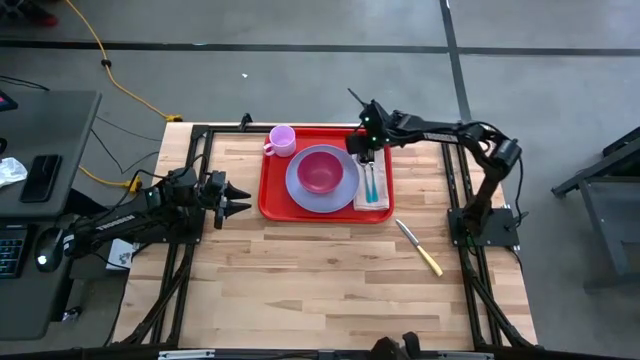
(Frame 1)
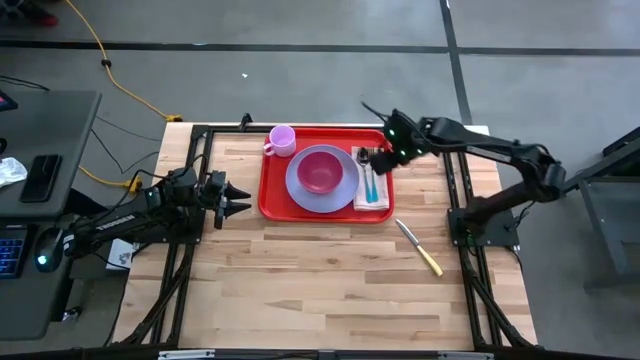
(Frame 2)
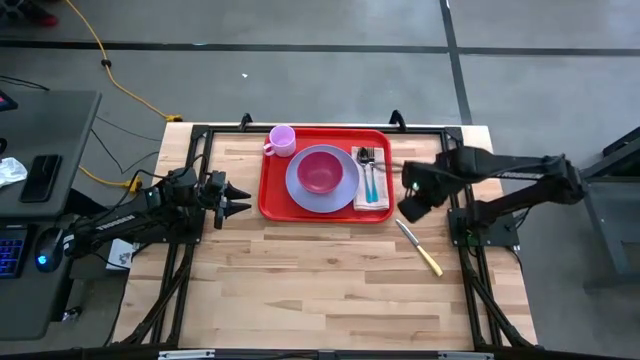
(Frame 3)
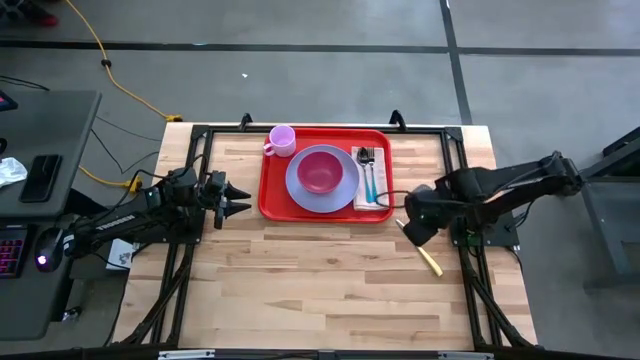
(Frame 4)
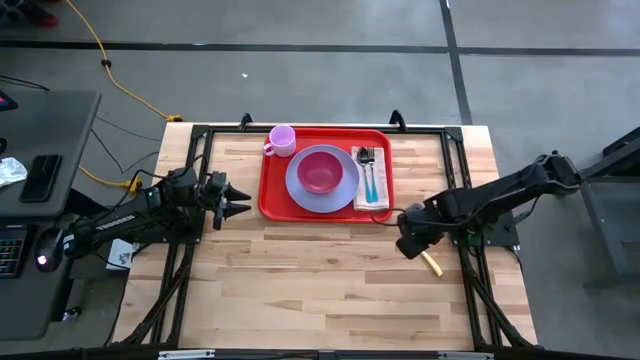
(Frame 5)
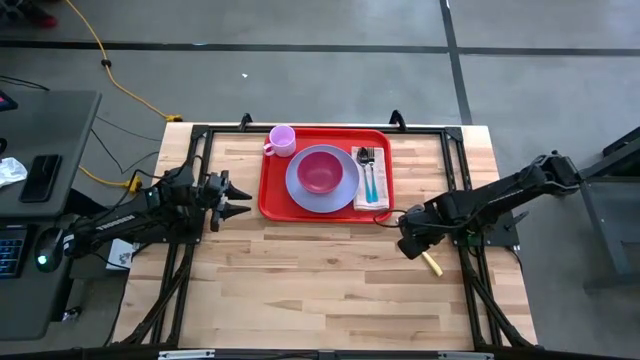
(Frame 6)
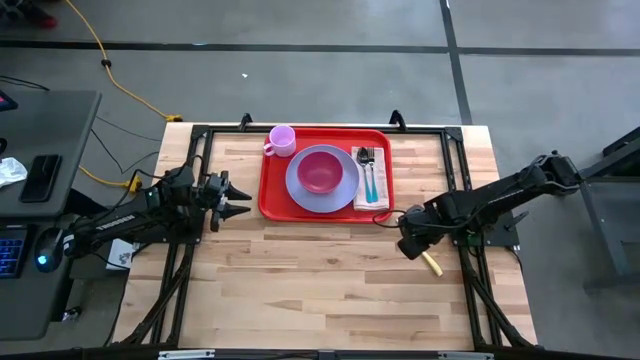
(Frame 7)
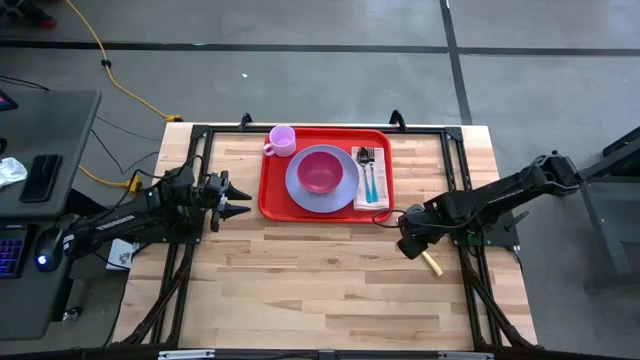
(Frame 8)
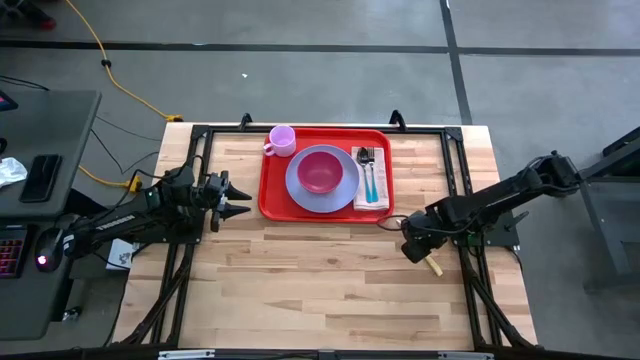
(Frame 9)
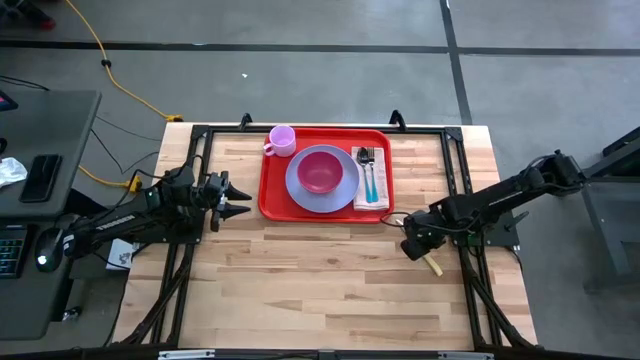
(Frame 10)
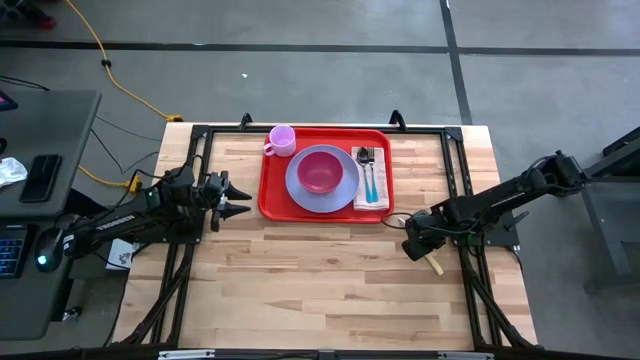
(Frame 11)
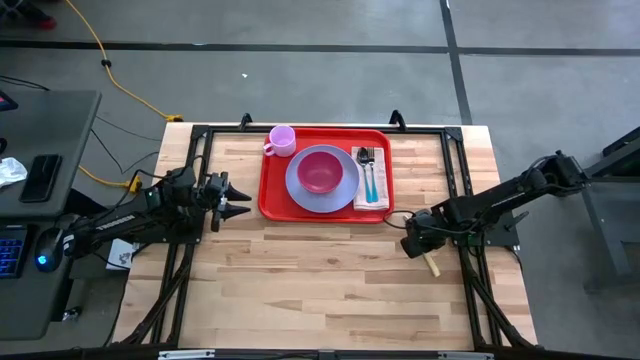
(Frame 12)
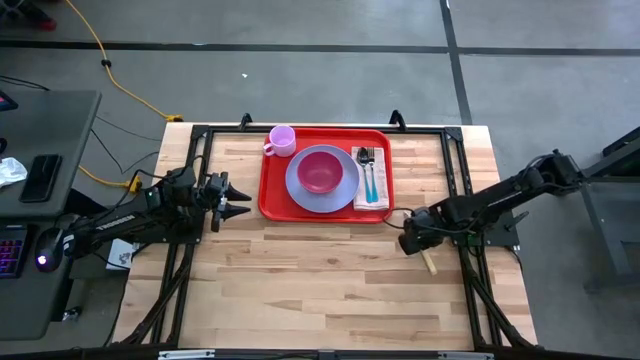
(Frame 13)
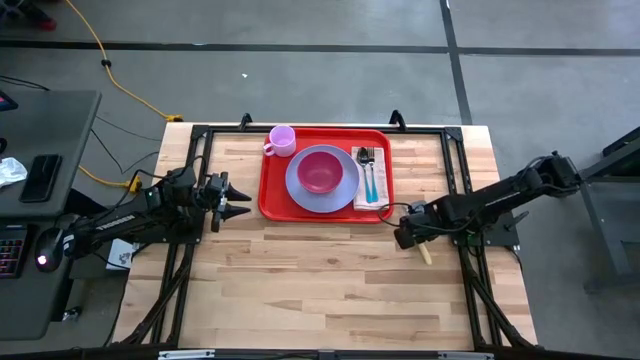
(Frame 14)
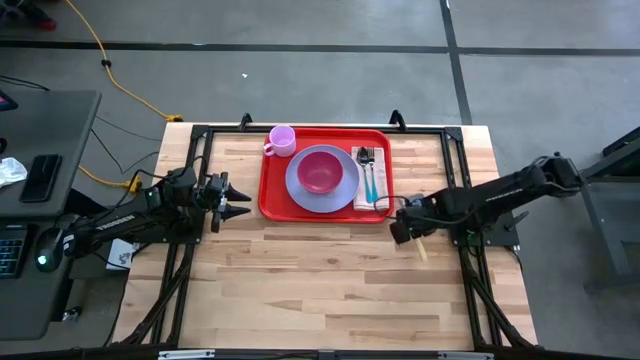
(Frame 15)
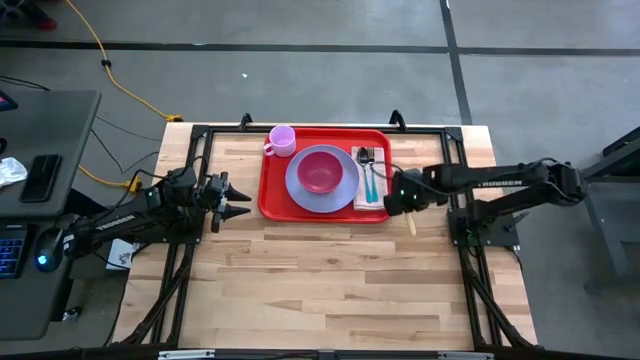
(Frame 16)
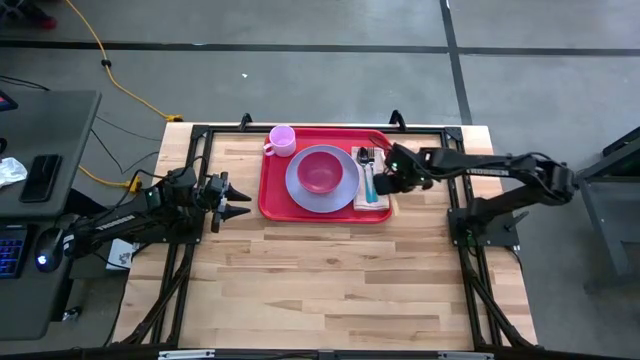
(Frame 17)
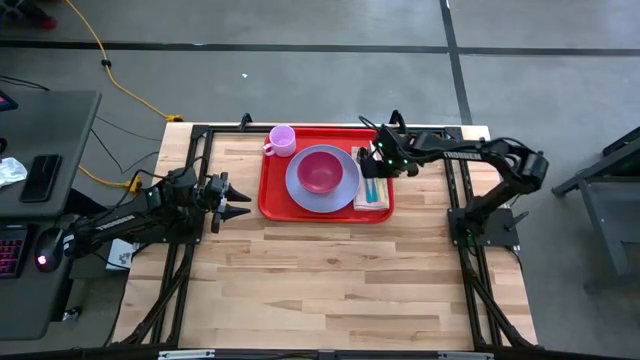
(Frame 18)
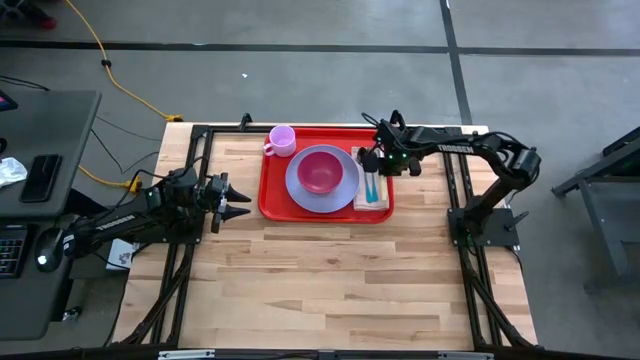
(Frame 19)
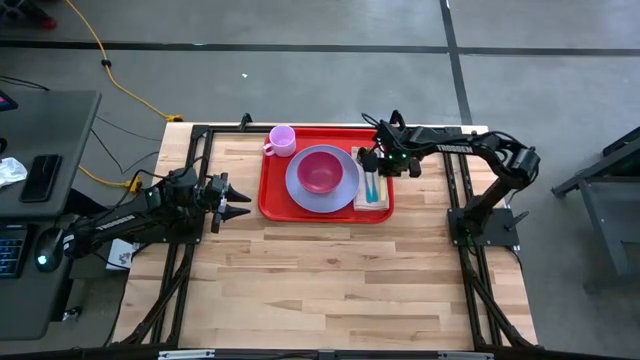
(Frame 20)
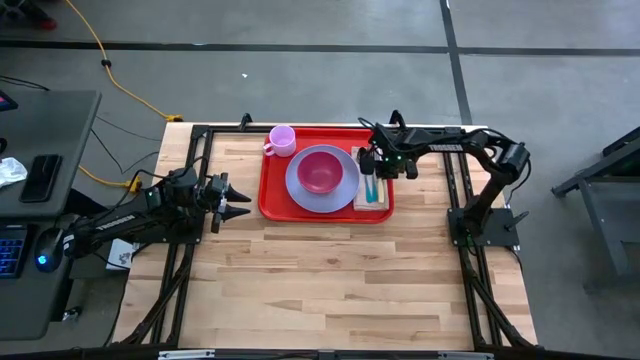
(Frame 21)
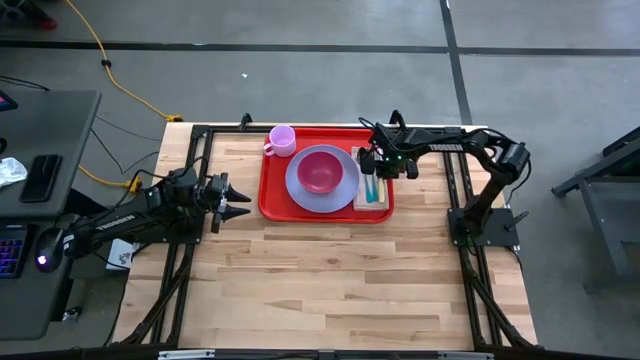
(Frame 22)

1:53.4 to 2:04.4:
Task: Set up tray
Put the knife on the napkin on the tray

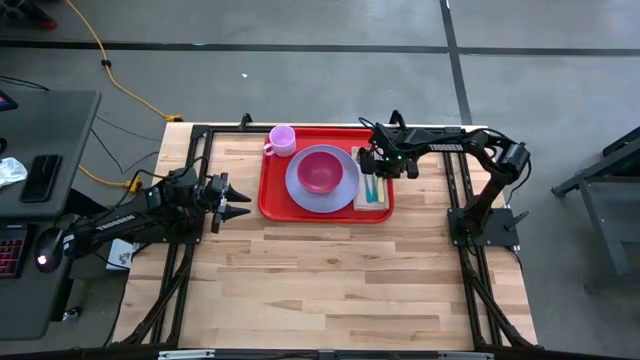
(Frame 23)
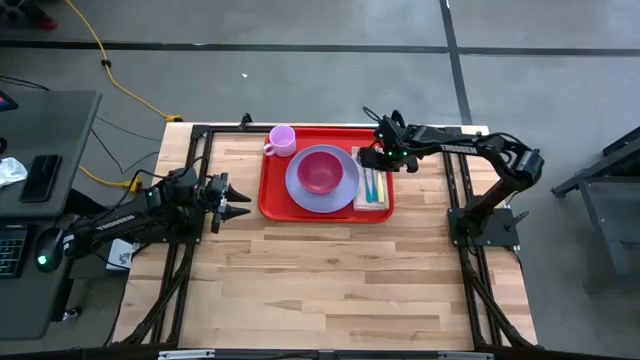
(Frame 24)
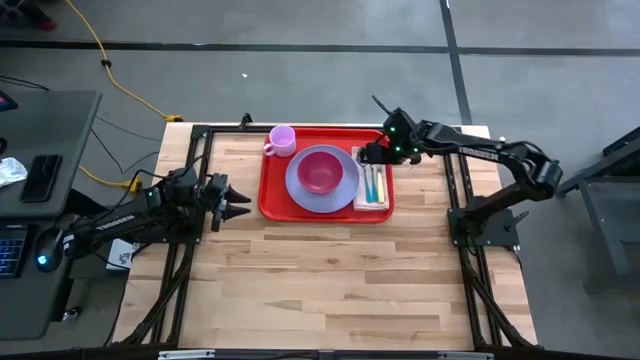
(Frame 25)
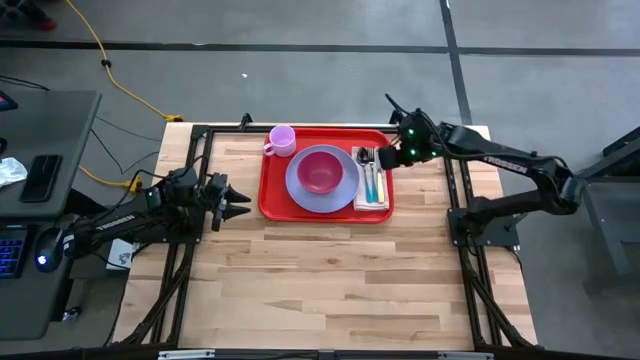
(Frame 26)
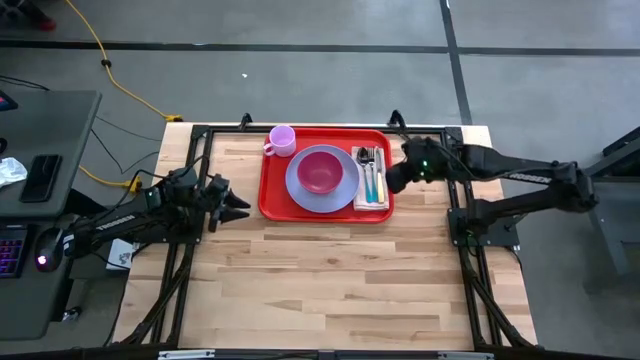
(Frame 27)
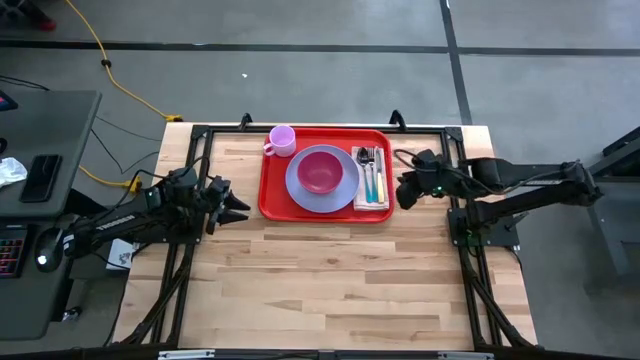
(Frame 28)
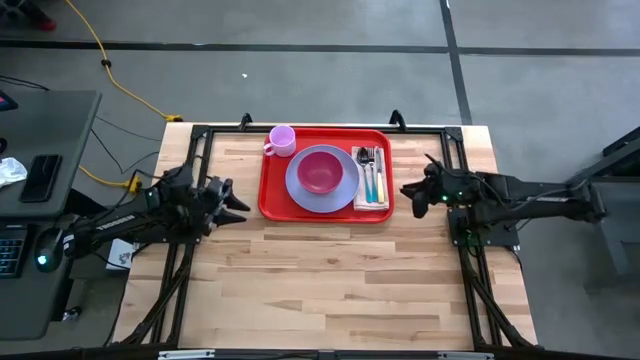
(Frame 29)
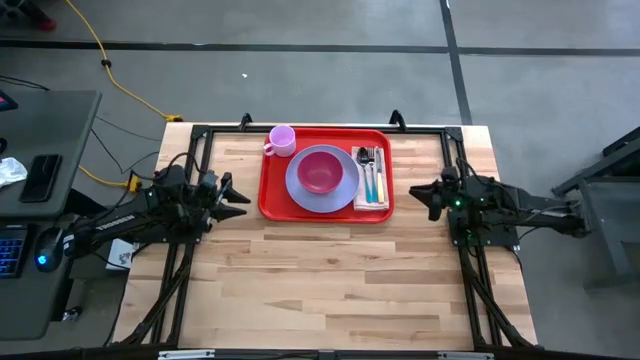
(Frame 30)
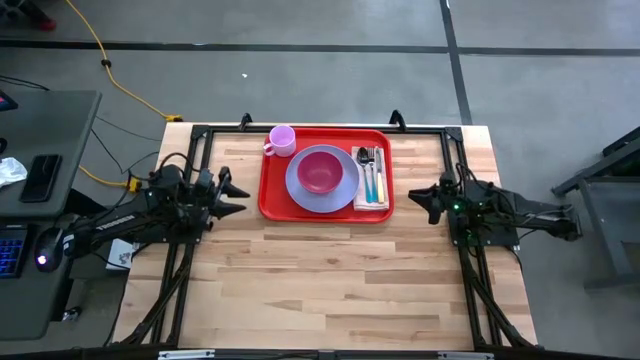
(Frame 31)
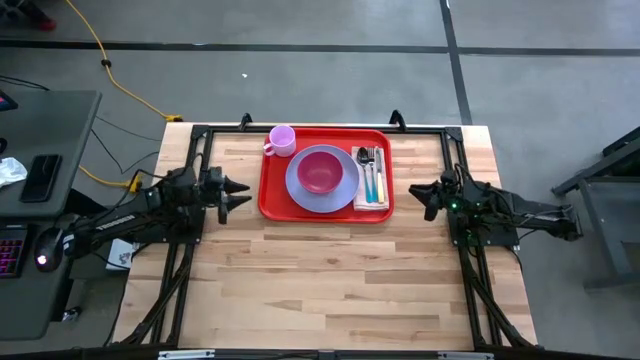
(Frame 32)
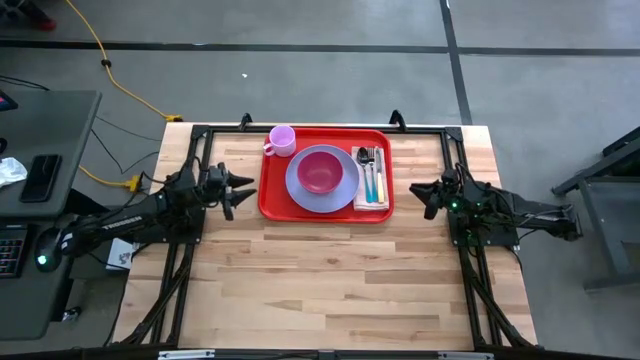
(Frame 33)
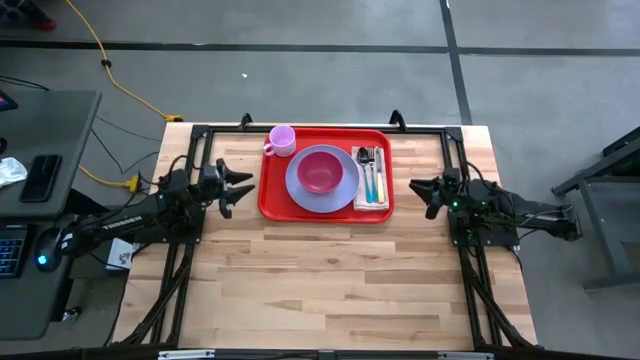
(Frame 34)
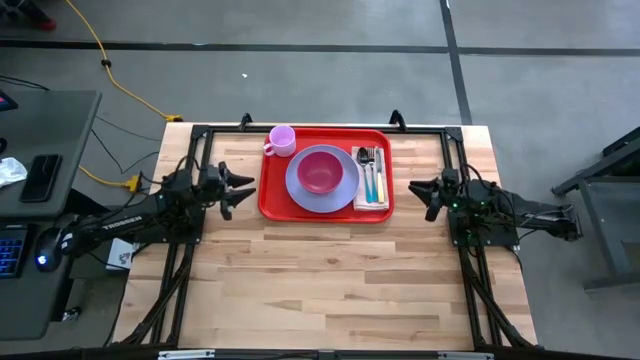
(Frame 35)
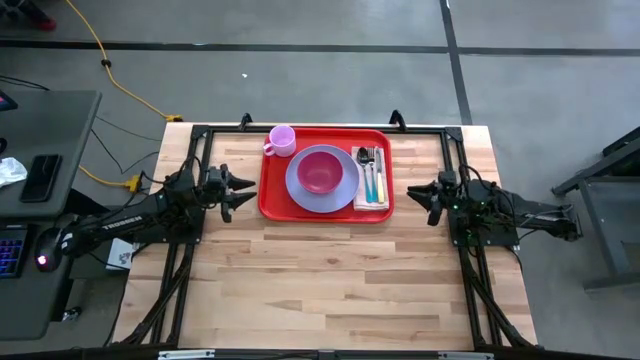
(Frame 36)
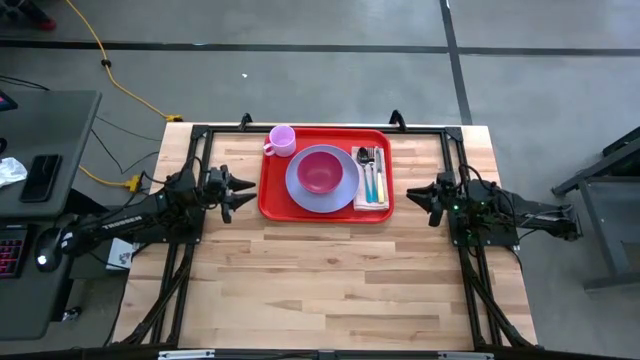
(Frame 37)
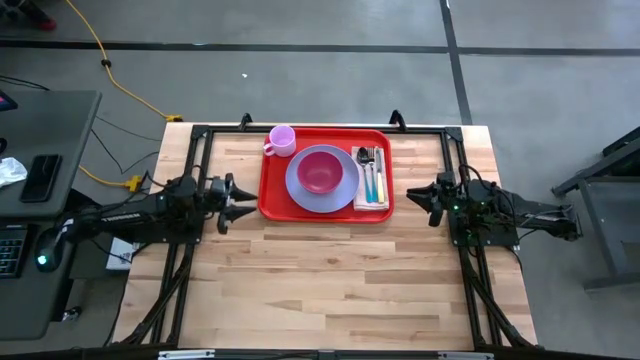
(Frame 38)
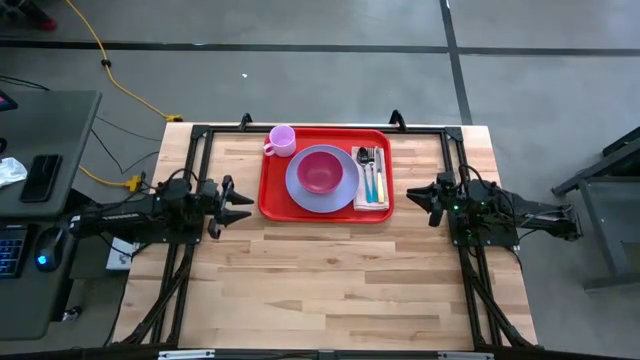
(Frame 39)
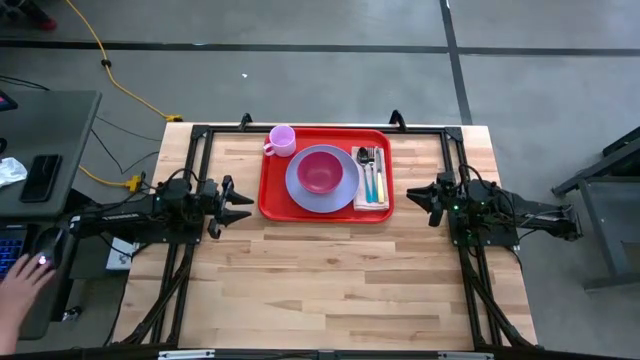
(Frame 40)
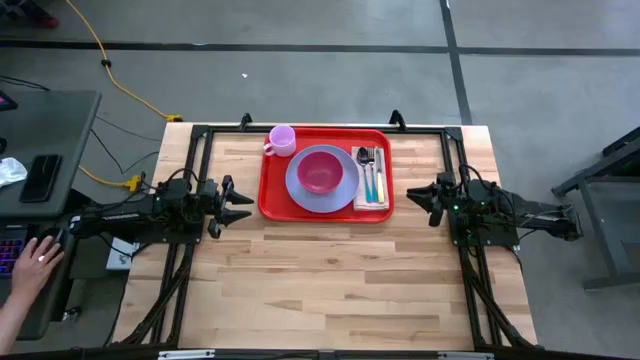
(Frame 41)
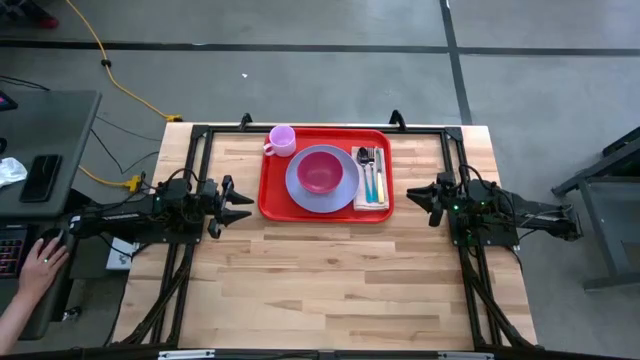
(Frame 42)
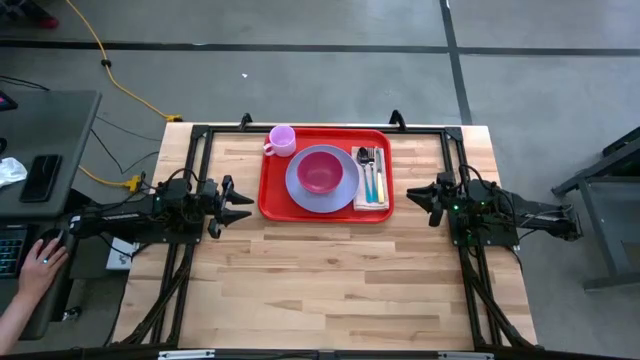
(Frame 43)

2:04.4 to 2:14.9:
Return to Home Position
